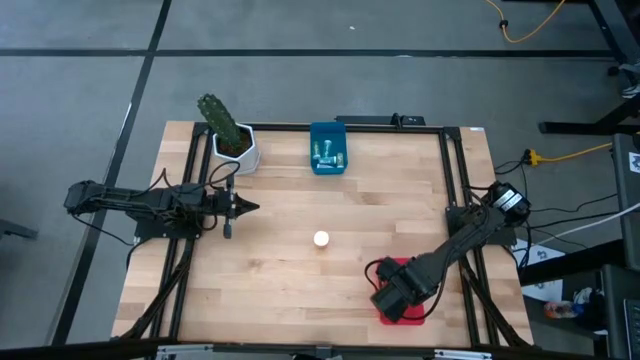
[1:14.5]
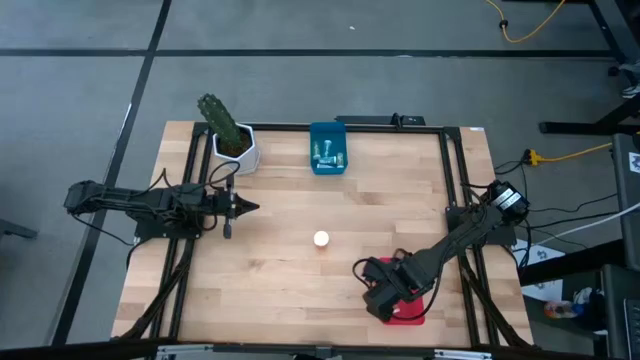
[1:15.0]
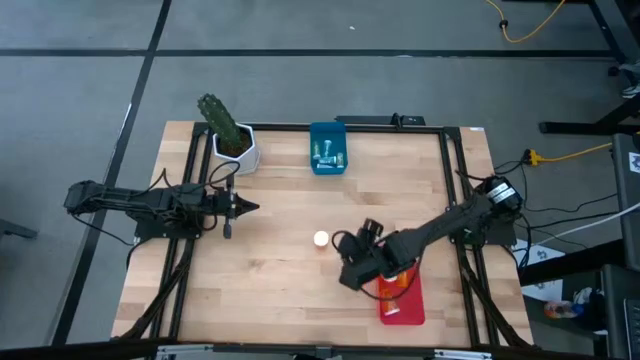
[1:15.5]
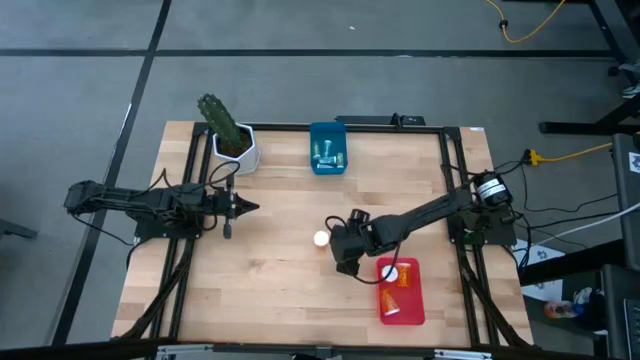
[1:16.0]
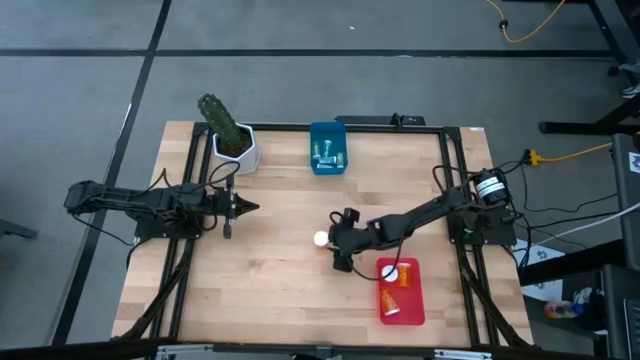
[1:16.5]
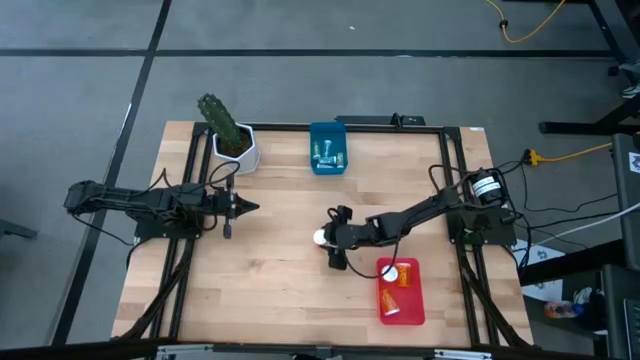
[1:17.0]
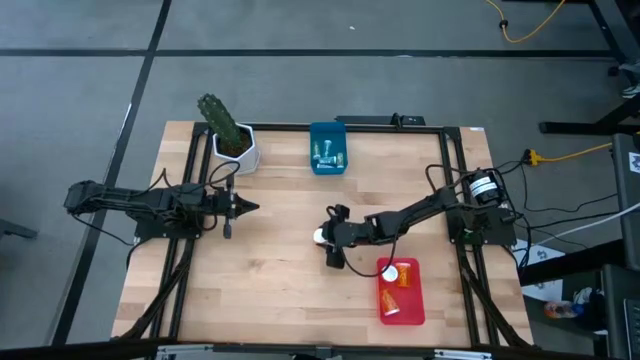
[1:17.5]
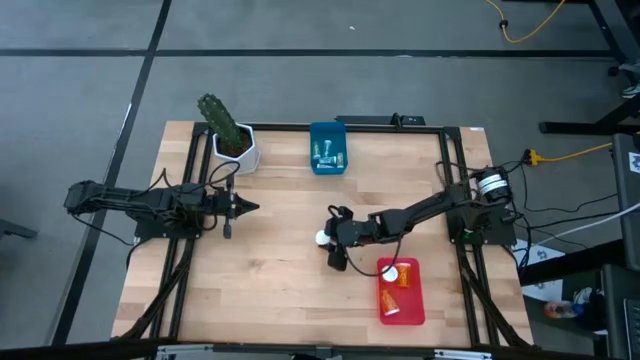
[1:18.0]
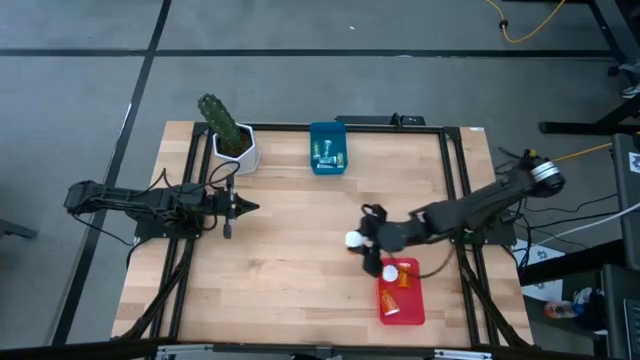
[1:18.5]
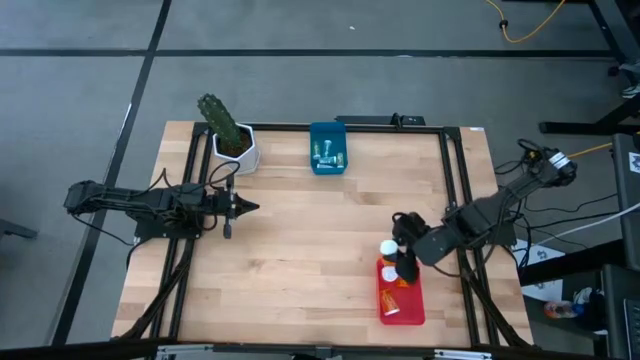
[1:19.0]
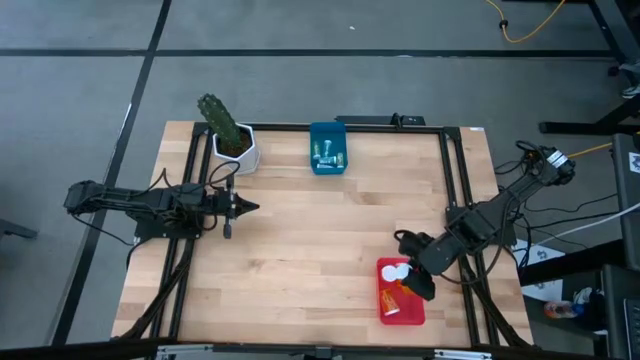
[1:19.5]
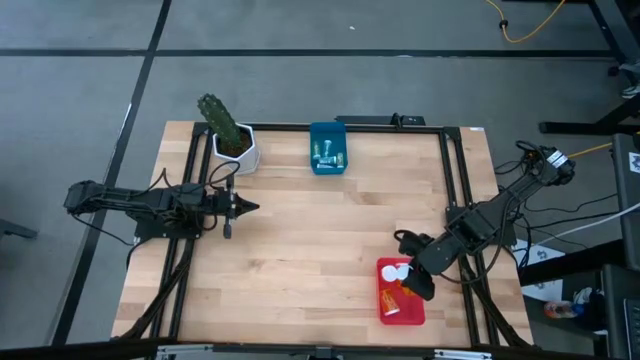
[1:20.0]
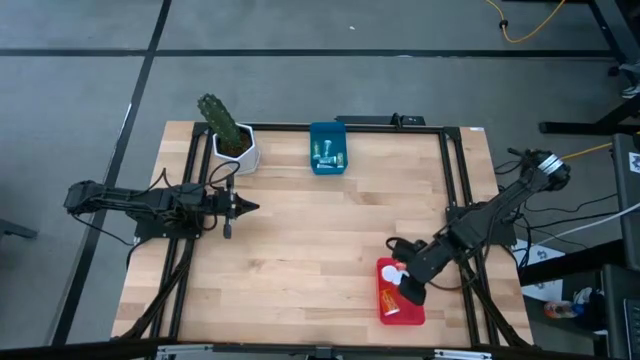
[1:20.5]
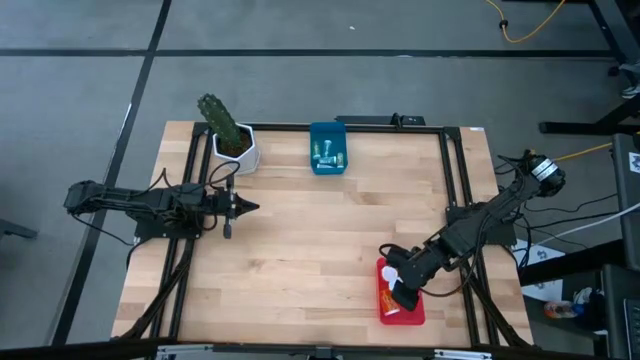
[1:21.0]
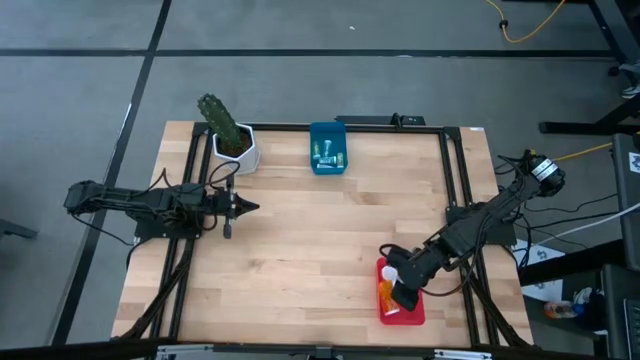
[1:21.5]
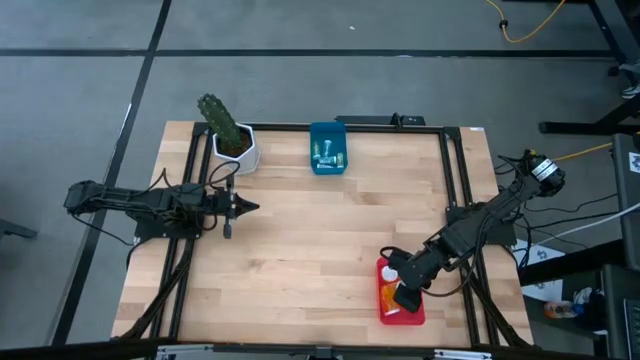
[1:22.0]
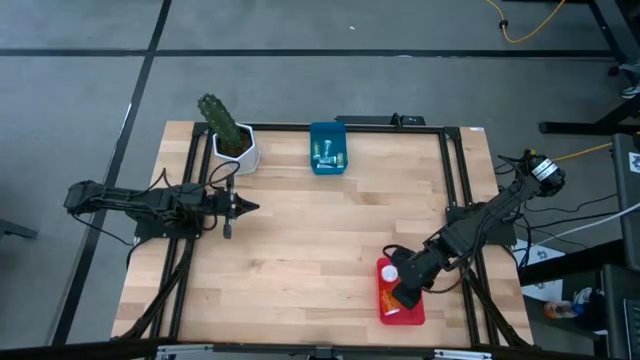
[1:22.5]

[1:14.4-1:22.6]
Task: Pick and place medicine bottles into bin by pill shape (circle, oval)
Put the large orange pill bottle into the red bin

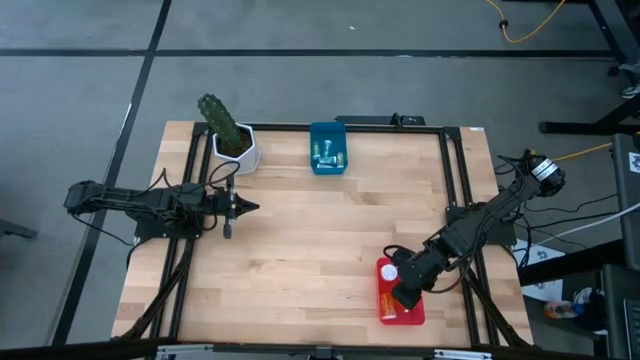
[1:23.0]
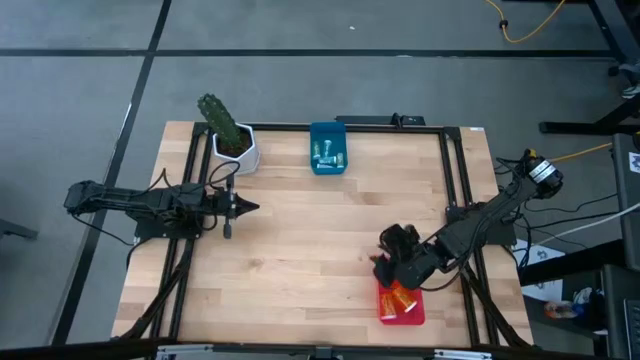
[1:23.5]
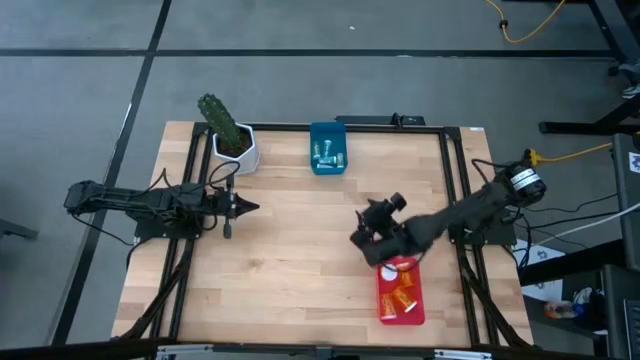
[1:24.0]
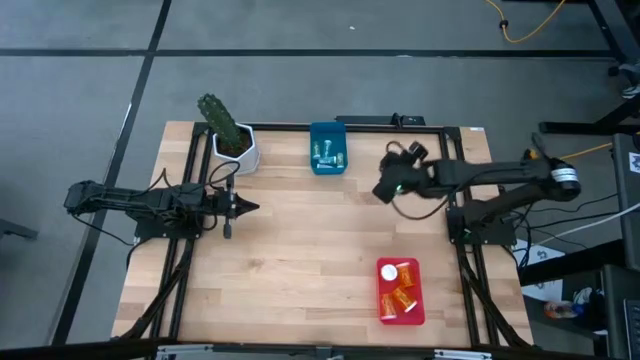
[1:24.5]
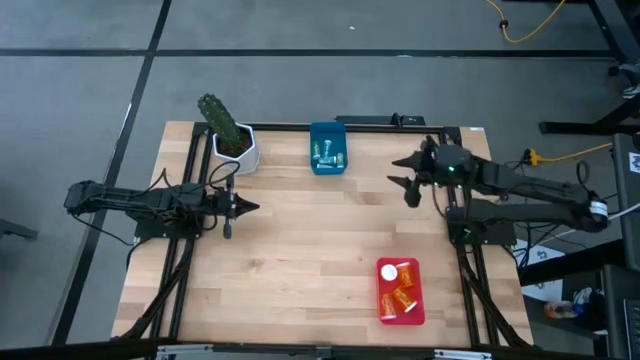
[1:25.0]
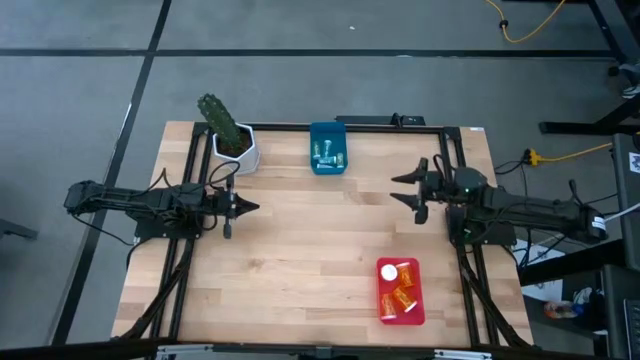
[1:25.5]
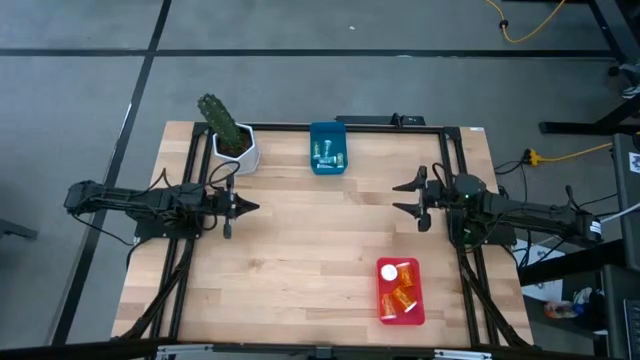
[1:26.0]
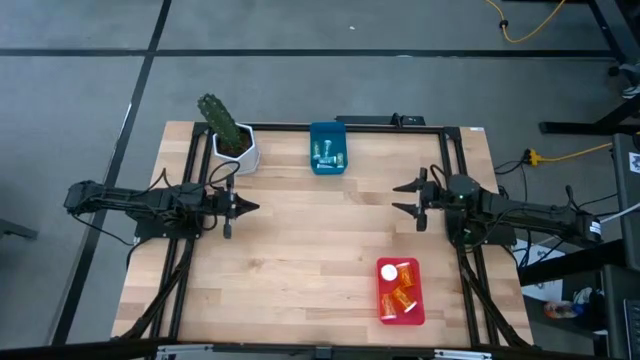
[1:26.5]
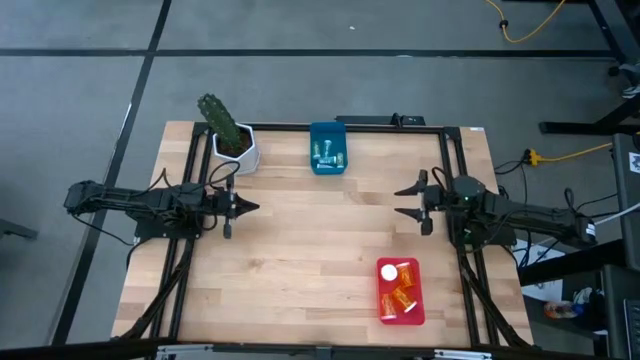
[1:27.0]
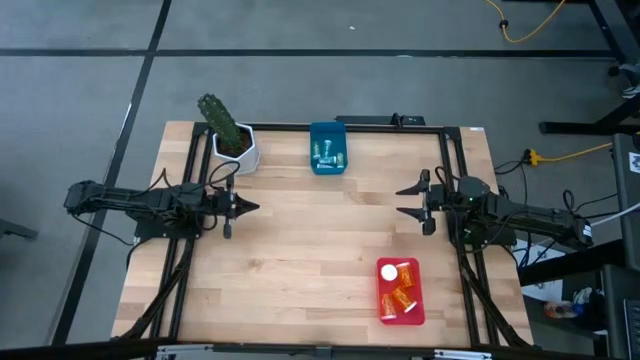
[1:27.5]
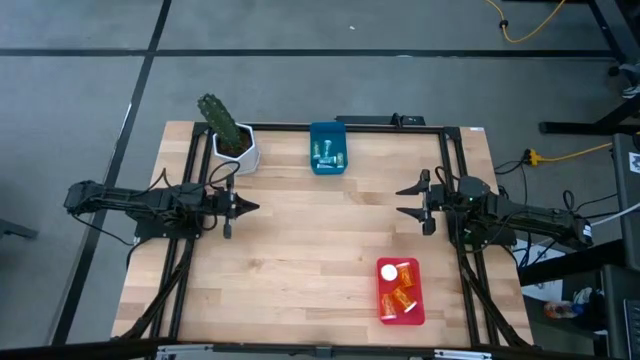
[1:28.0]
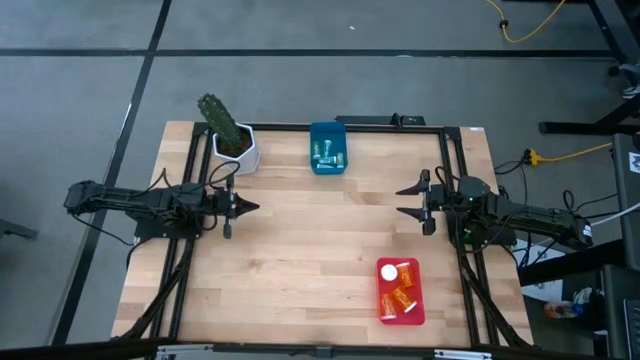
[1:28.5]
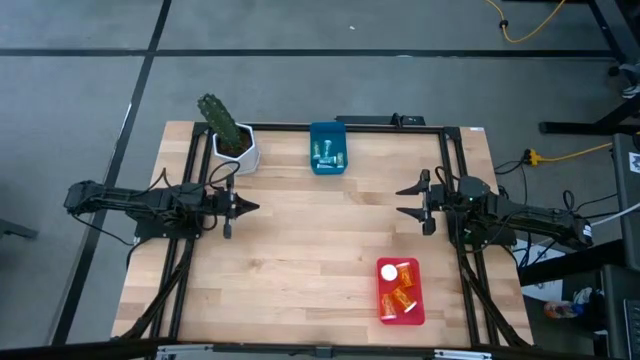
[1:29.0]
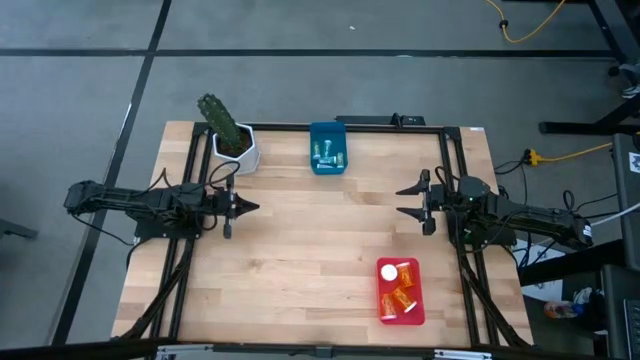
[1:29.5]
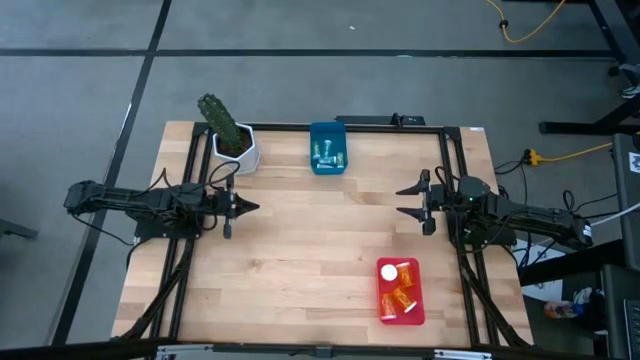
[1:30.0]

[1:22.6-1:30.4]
Return to Home Position

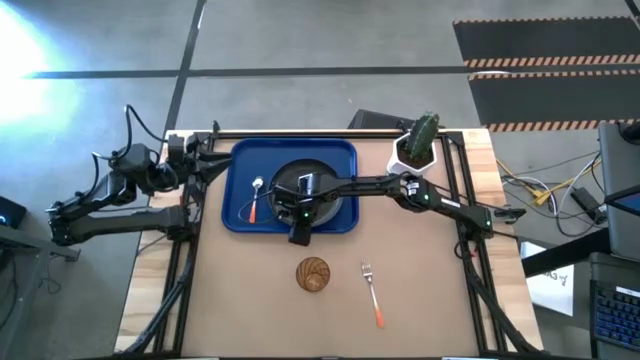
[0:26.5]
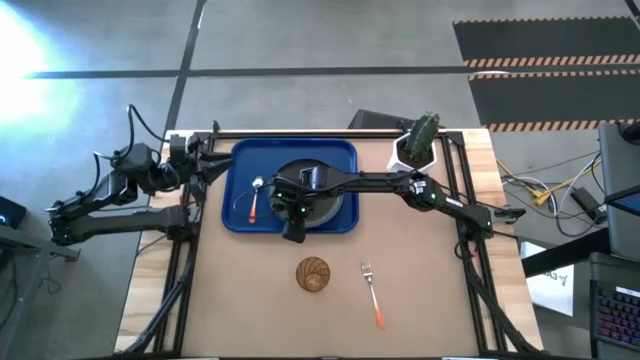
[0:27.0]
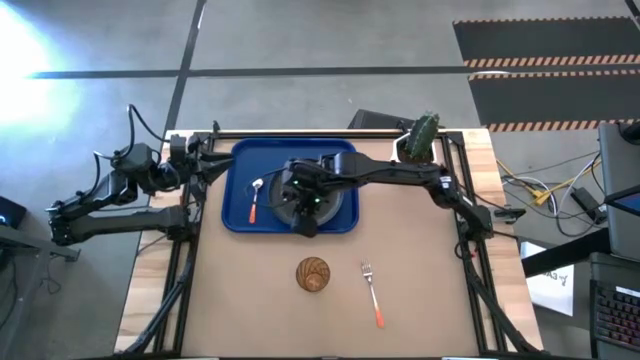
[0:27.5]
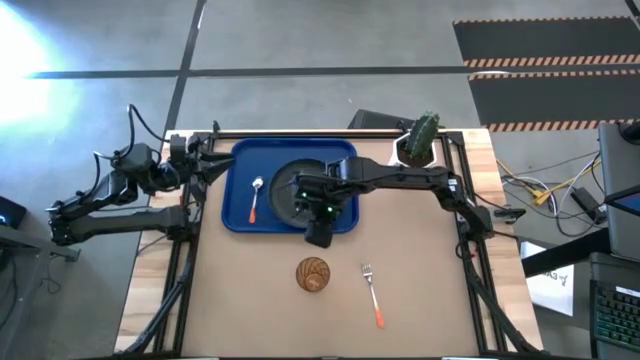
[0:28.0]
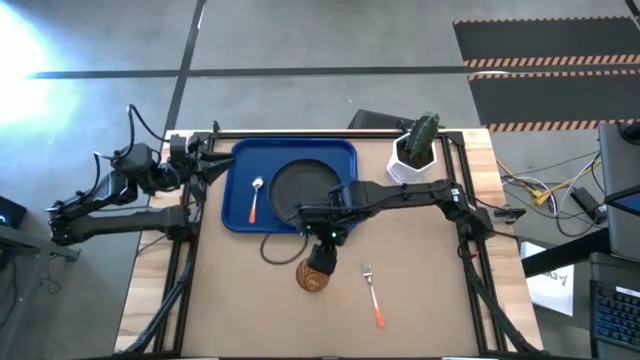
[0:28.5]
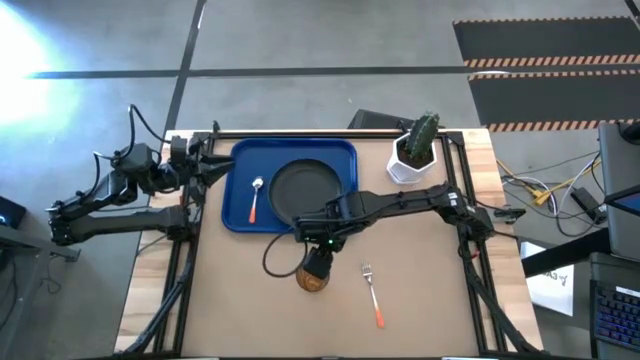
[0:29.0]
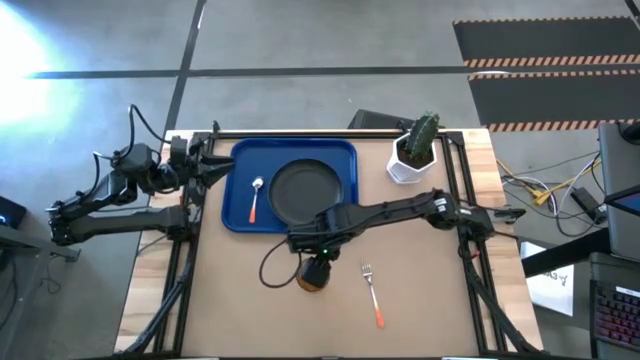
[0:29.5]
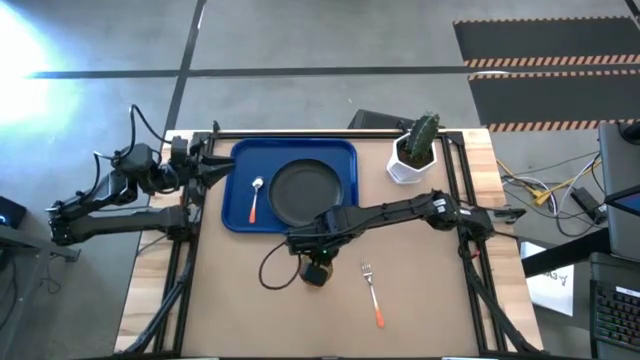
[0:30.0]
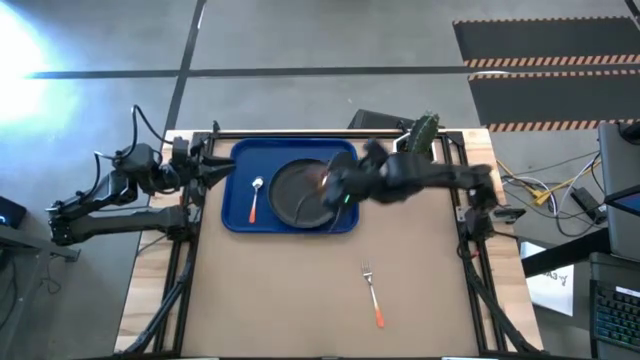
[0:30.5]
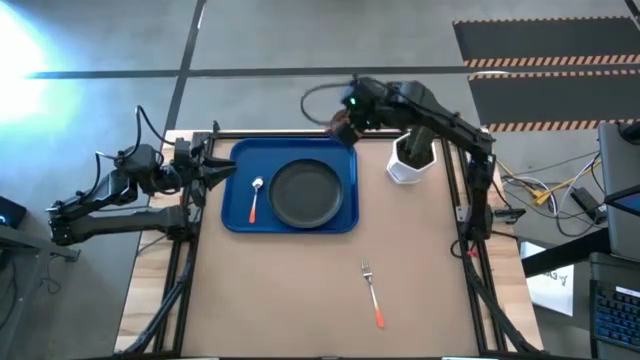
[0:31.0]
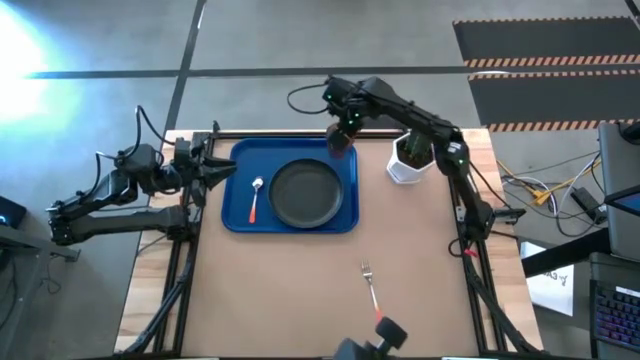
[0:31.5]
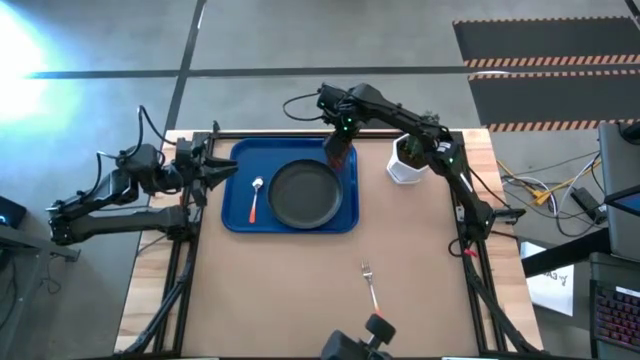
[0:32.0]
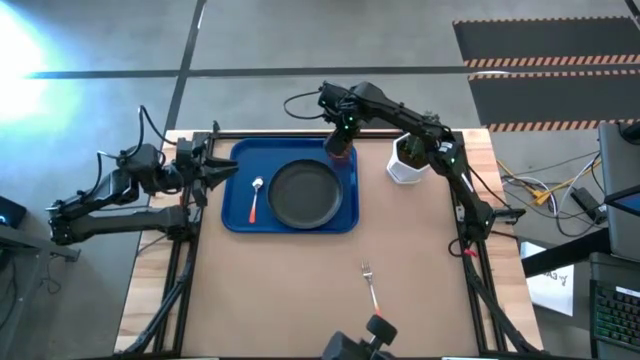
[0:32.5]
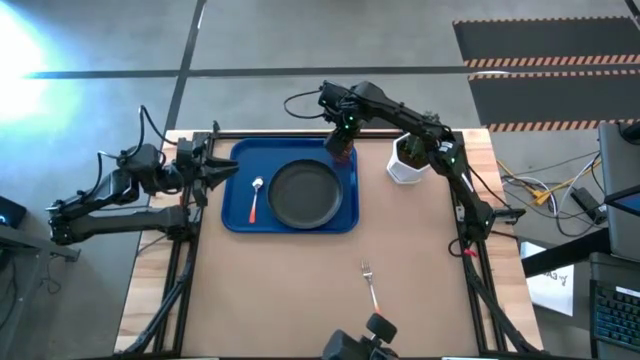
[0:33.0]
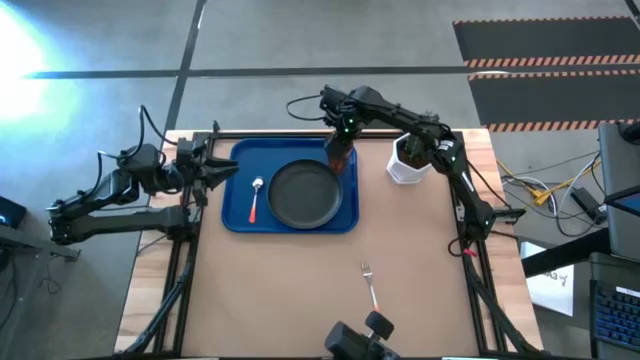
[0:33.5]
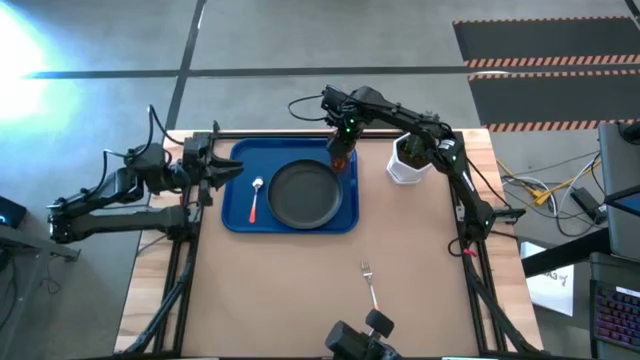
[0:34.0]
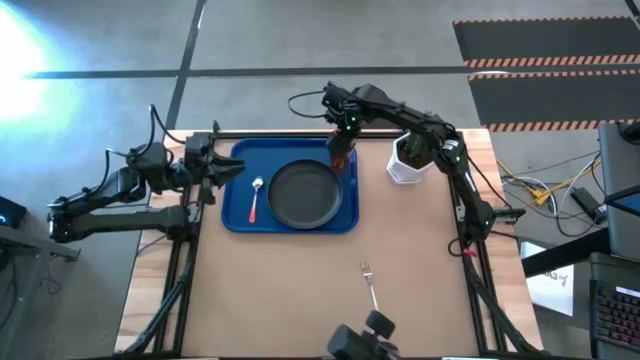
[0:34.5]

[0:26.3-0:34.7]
Task: Pick and place plate/cup/fork/spoon on tray
Put the brown cup on the blue tray to the top right of the black plate
